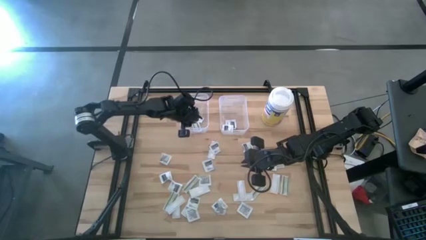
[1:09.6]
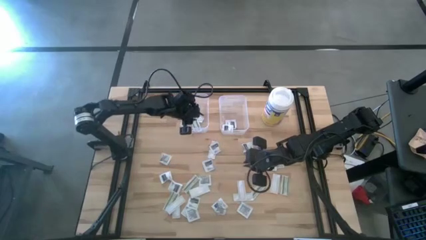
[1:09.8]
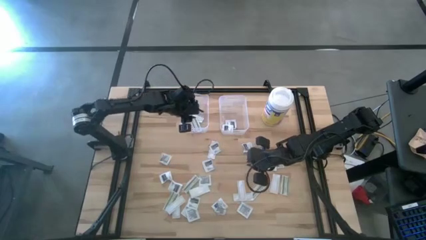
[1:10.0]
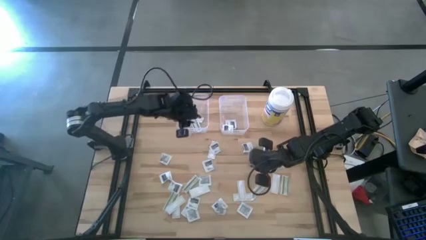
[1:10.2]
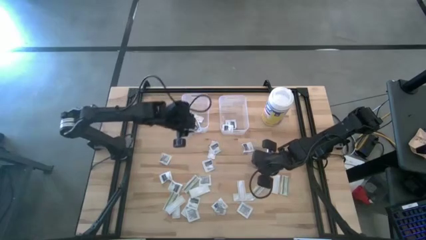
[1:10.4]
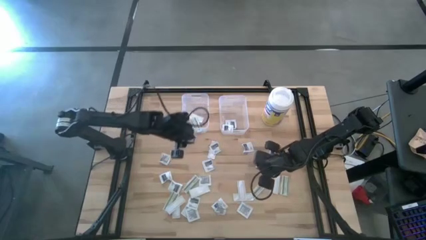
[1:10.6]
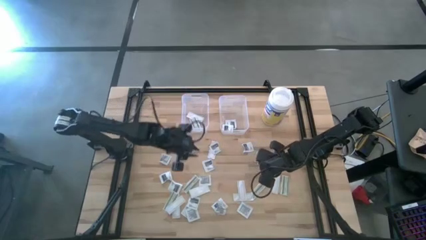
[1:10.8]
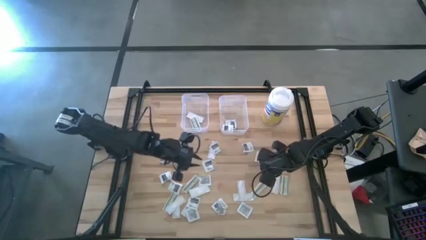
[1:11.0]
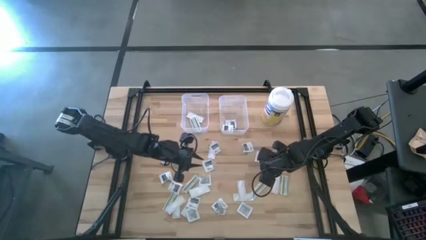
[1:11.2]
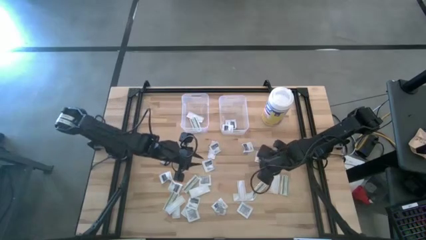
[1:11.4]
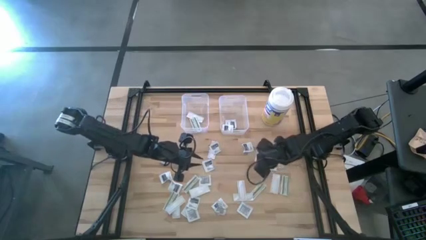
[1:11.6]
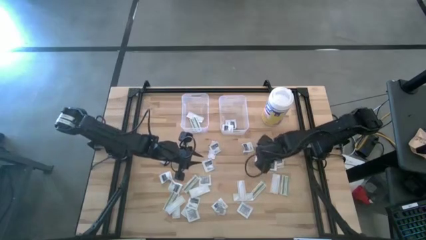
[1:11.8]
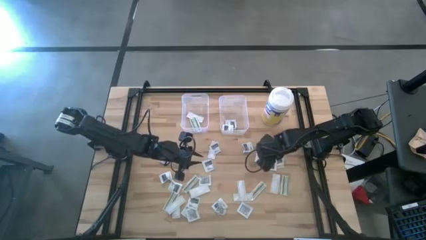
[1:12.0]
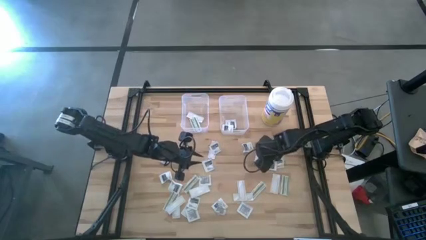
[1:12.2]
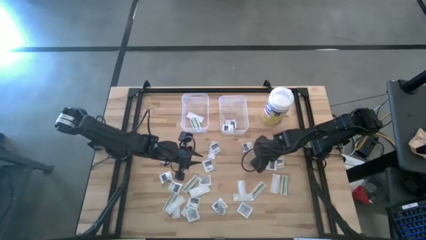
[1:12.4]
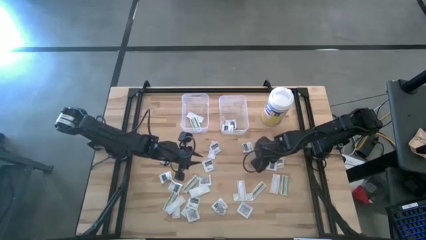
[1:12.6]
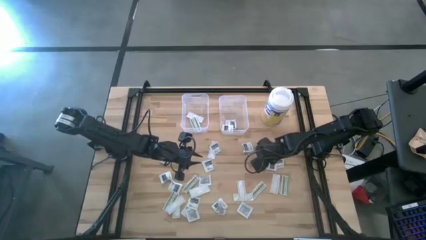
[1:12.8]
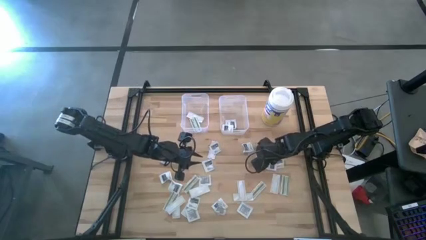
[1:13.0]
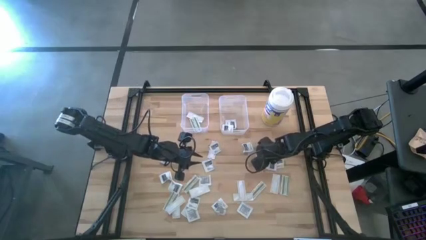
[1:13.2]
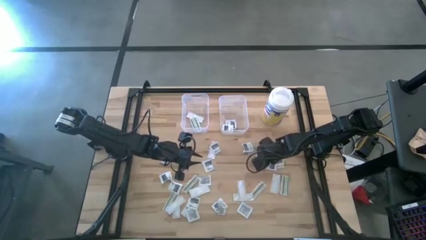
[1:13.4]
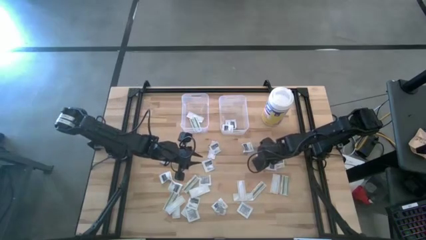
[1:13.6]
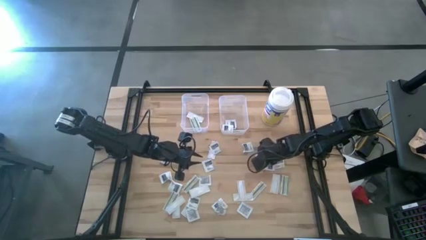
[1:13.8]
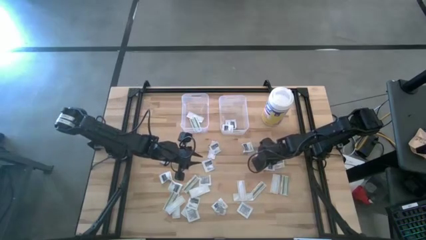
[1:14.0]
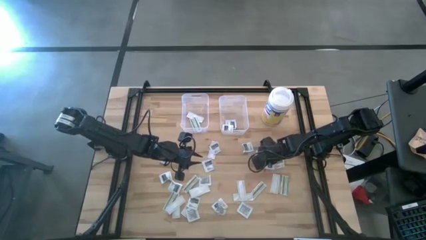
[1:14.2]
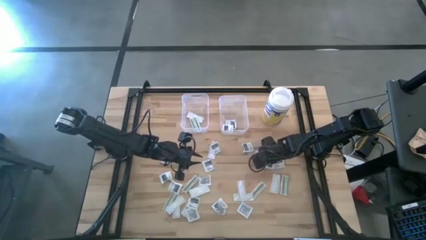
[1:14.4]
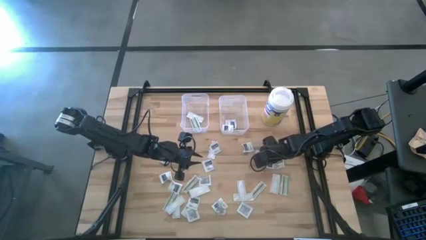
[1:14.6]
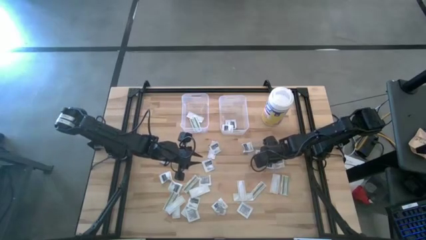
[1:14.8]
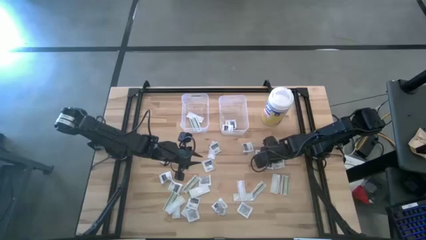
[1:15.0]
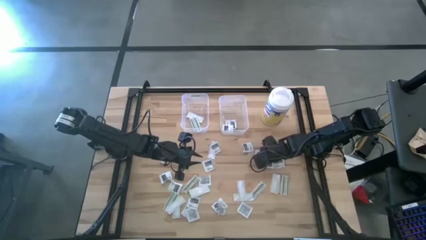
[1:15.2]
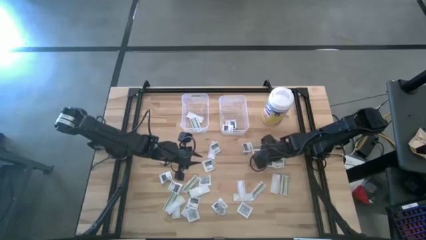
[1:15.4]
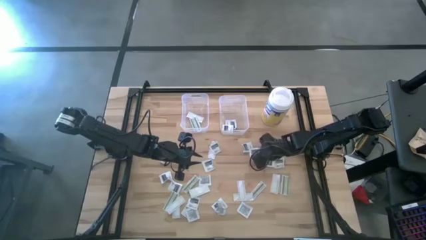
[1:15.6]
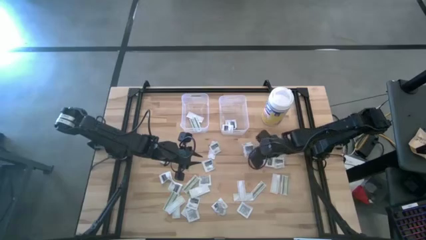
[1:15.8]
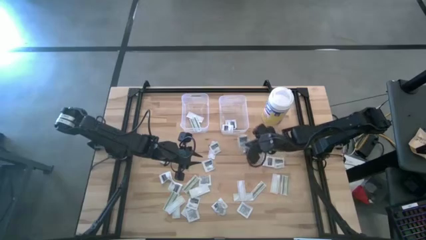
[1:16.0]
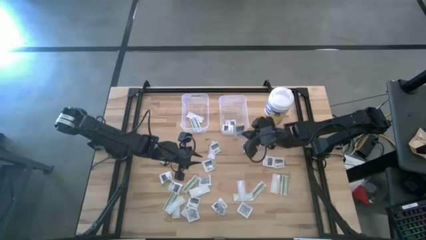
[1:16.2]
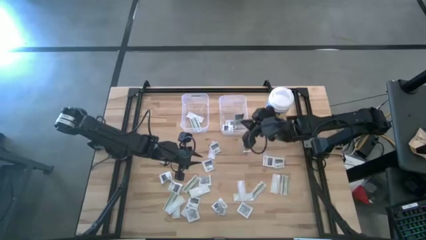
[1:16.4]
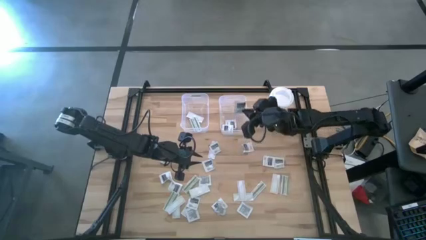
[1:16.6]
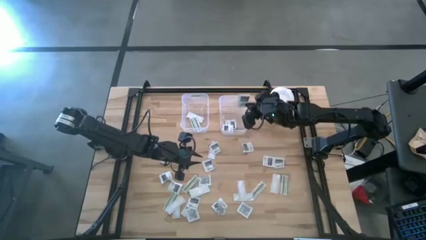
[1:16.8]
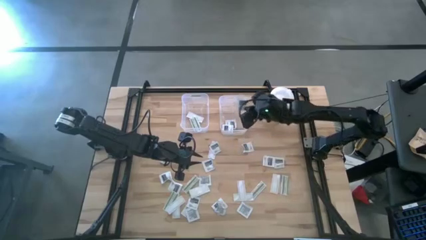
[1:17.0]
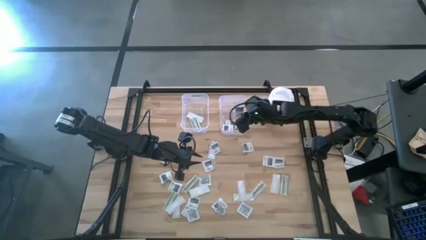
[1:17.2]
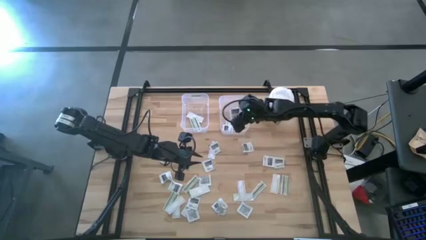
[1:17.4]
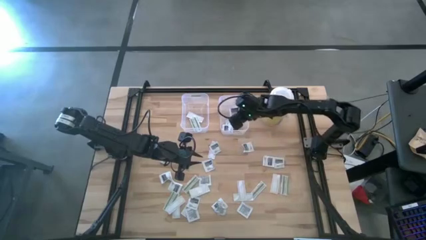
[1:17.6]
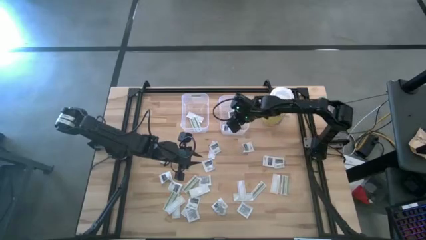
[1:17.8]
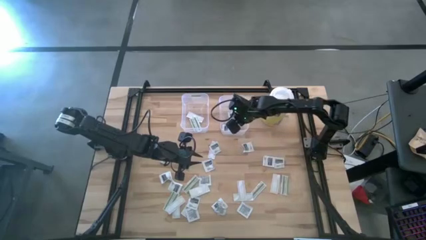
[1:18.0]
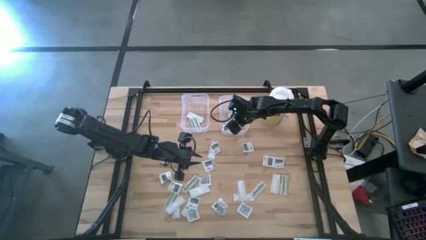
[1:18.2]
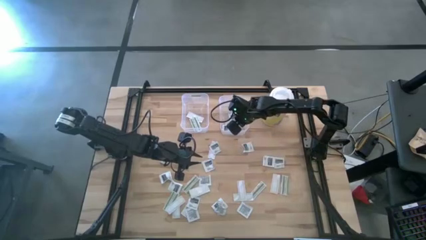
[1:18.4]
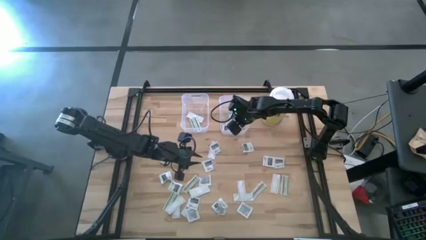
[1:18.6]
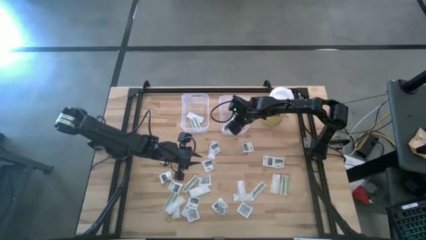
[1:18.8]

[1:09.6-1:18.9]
Task: Pick & Place First Aid Supplies
Put the gray towelette pack into the right transparent bin

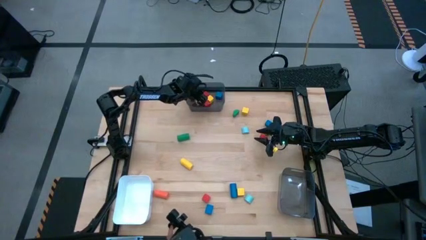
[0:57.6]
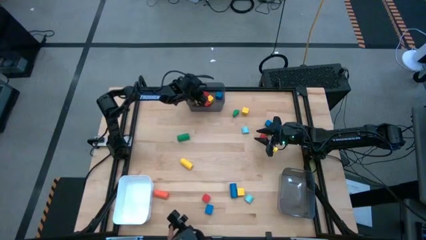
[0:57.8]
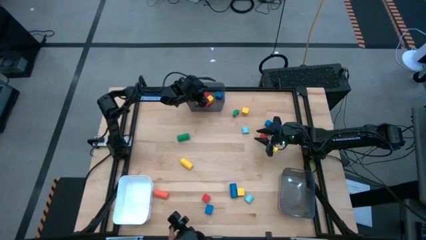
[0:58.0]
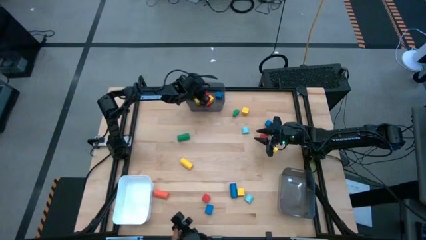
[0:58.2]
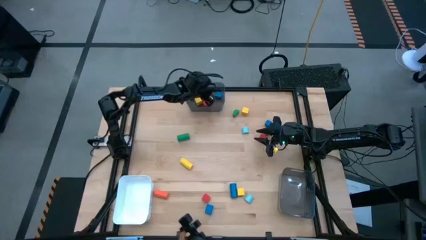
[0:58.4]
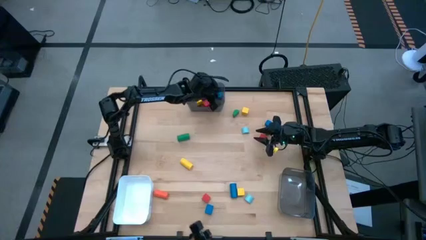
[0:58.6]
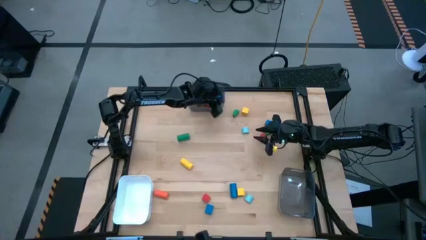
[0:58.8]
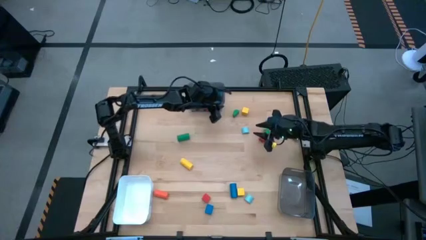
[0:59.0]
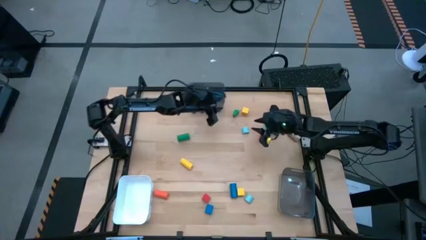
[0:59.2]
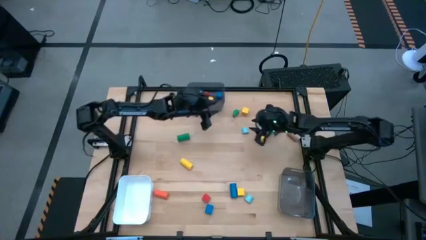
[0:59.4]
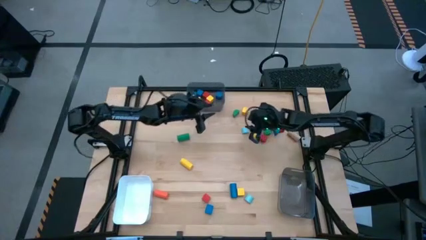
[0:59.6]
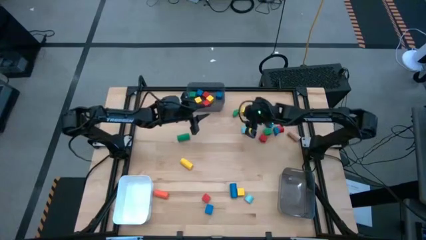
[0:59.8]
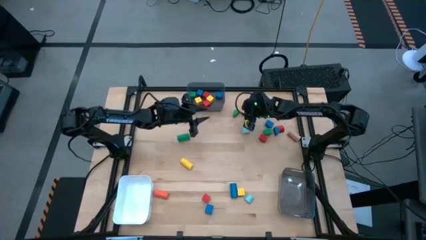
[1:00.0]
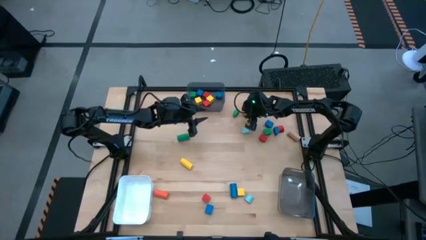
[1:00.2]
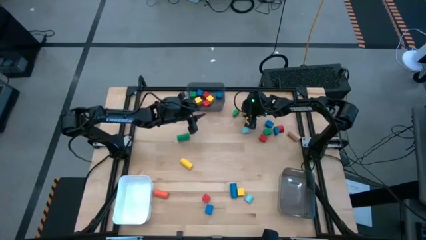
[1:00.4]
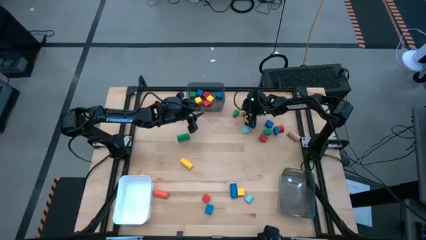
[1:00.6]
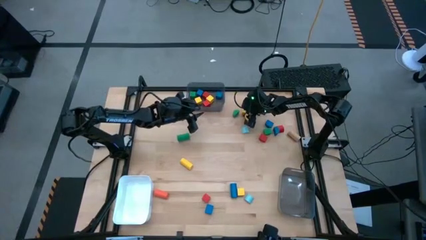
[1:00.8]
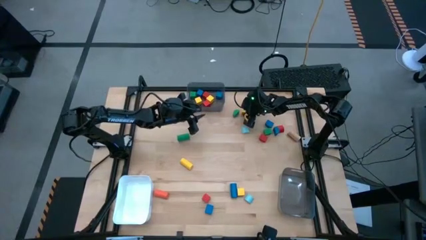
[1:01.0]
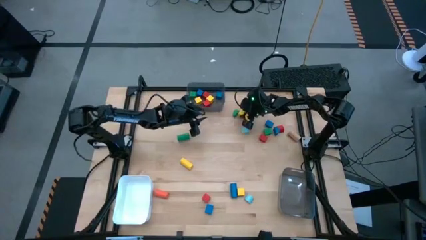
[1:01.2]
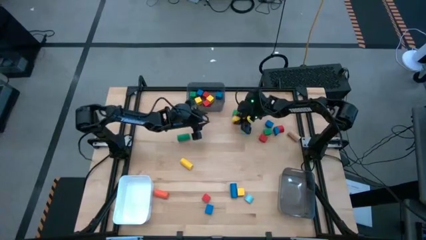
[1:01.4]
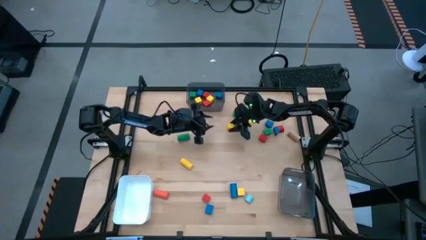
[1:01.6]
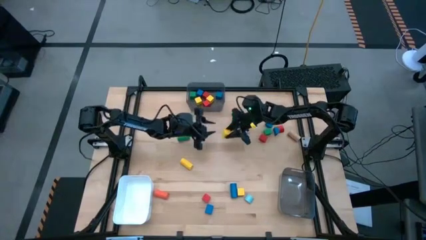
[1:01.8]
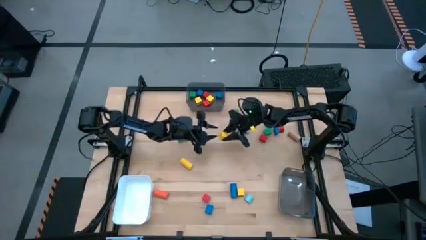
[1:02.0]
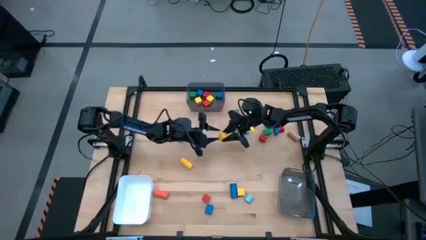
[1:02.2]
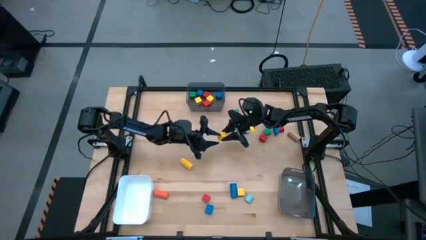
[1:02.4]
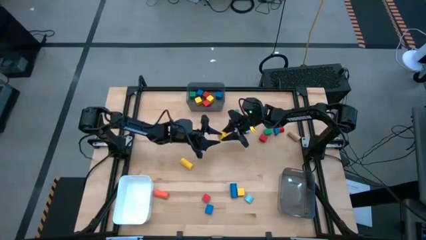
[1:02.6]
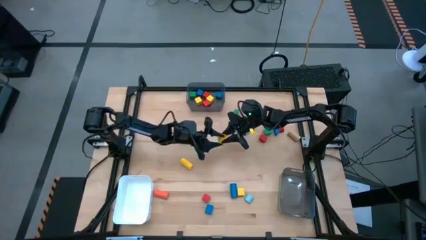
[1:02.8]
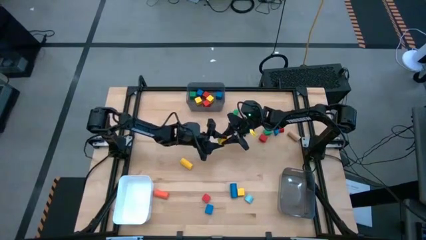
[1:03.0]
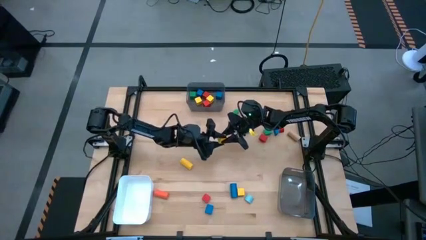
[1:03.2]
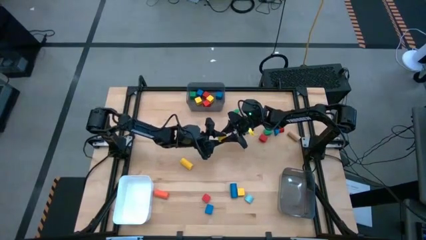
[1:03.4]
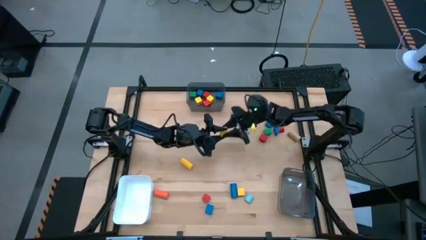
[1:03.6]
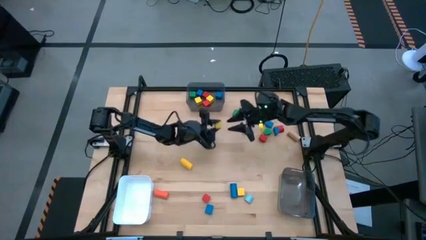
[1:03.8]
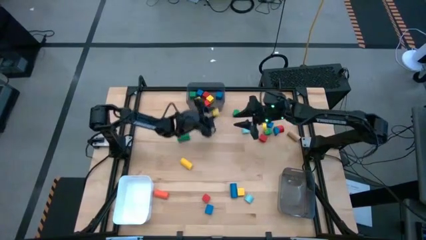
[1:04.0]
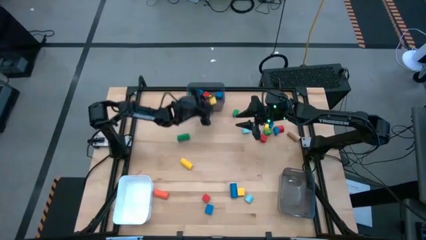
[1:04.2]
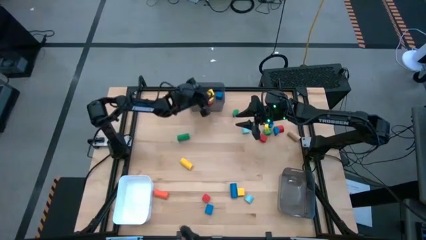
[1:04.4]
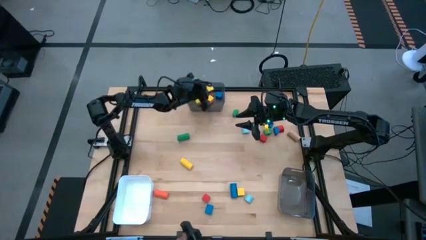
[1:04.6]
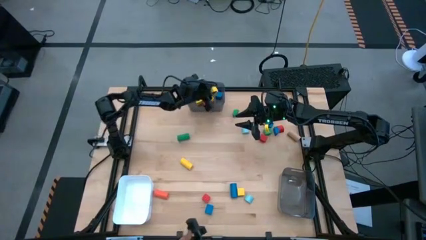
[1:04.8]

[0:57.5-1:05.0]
Task: Sort blocks by size
Put the yellow square block into the top black bin
